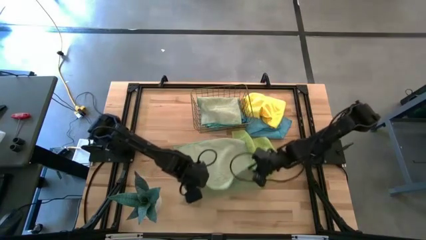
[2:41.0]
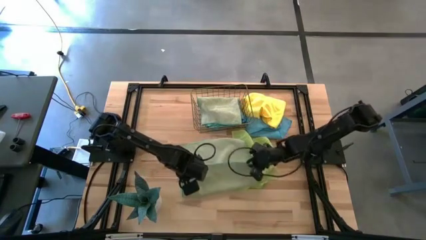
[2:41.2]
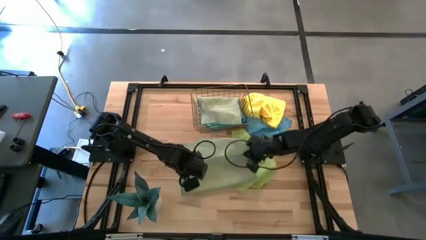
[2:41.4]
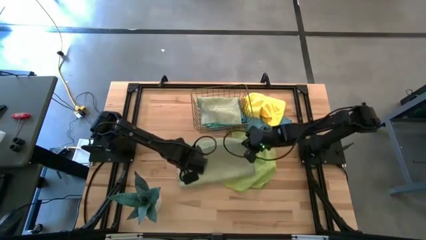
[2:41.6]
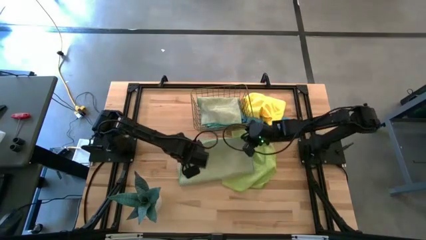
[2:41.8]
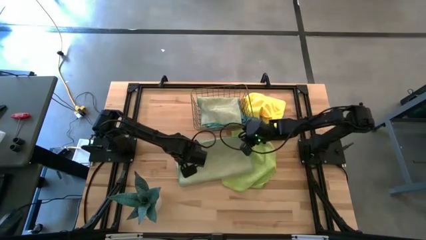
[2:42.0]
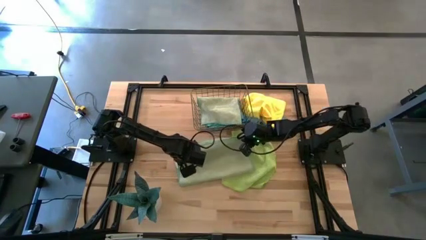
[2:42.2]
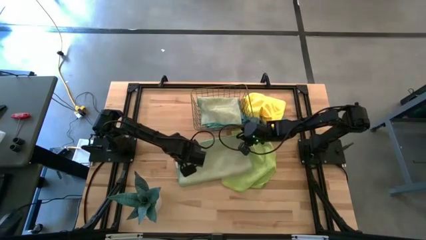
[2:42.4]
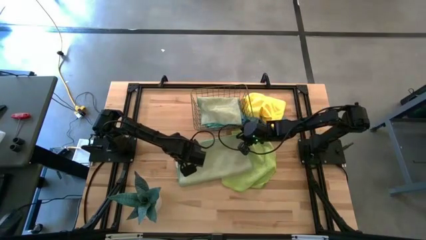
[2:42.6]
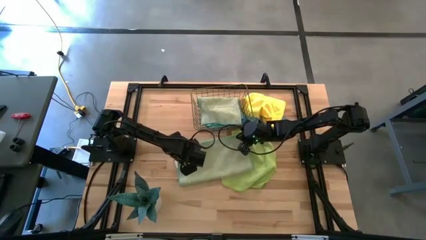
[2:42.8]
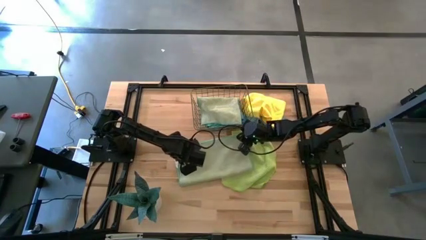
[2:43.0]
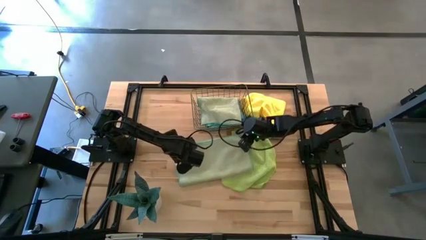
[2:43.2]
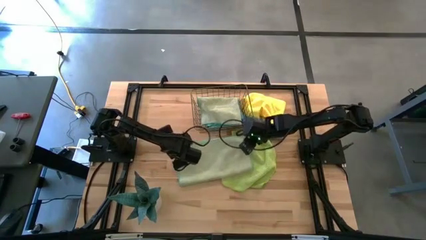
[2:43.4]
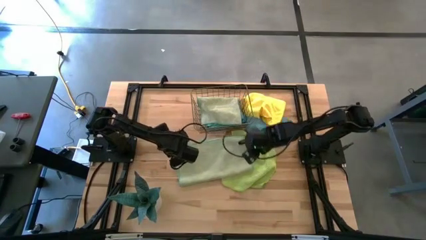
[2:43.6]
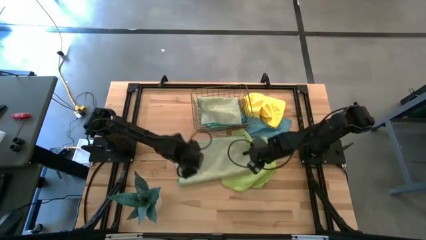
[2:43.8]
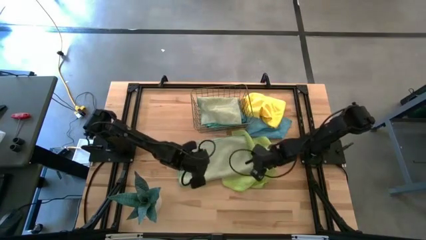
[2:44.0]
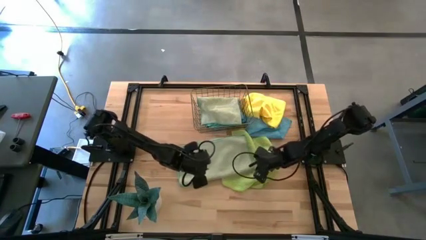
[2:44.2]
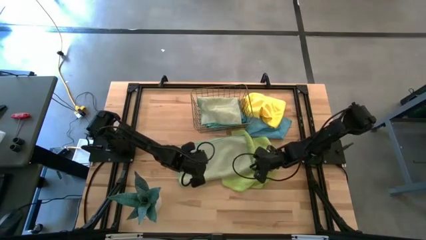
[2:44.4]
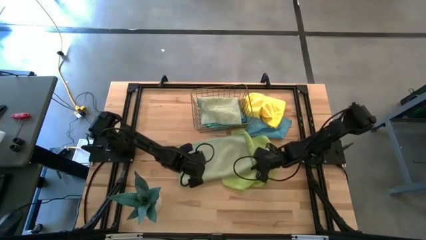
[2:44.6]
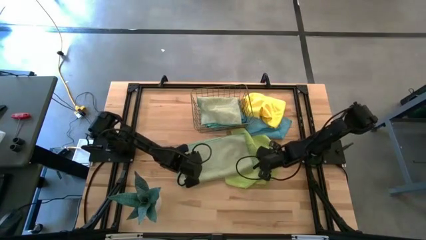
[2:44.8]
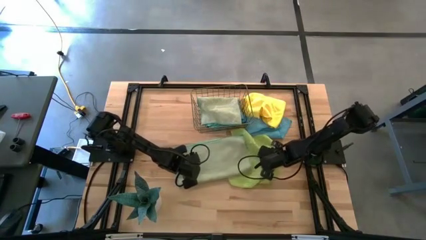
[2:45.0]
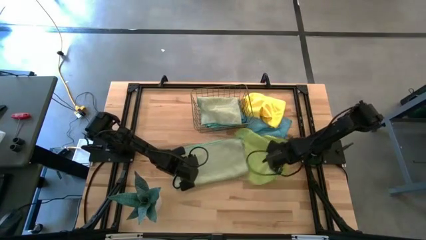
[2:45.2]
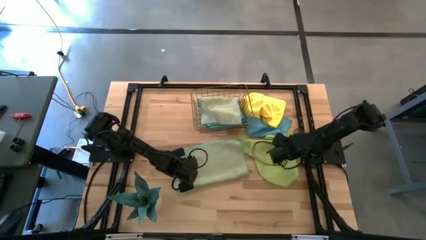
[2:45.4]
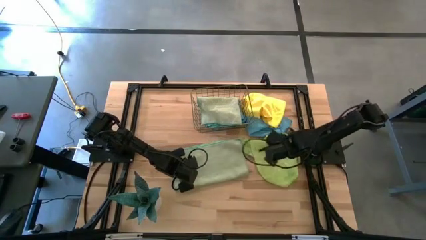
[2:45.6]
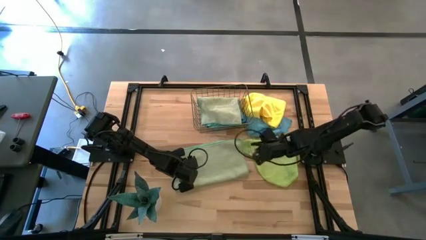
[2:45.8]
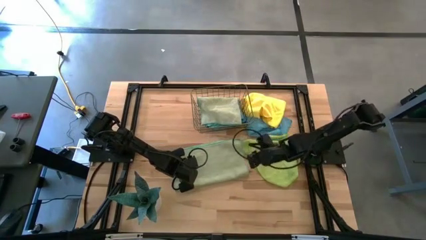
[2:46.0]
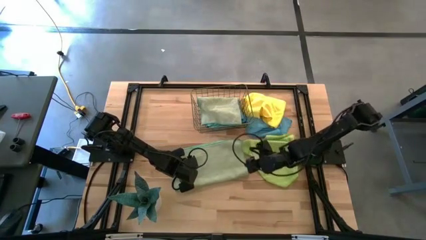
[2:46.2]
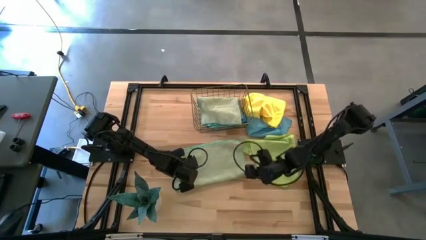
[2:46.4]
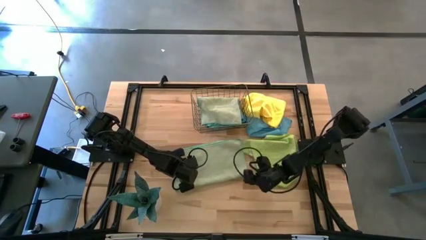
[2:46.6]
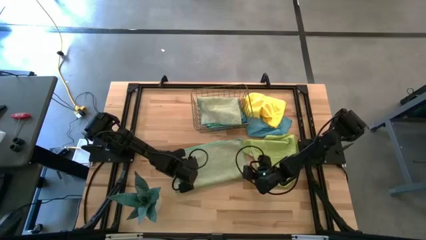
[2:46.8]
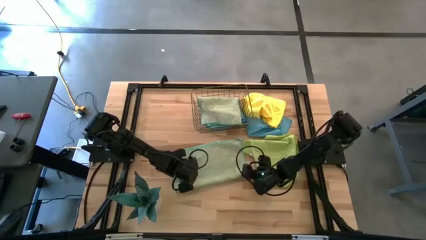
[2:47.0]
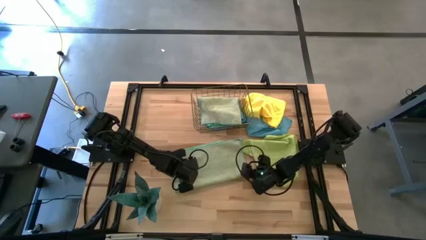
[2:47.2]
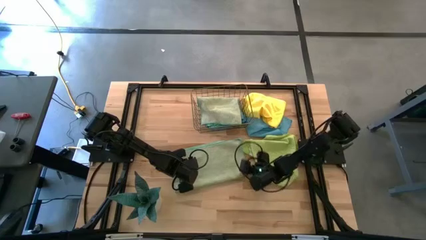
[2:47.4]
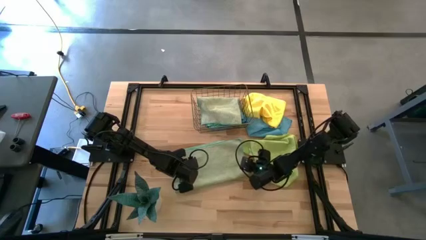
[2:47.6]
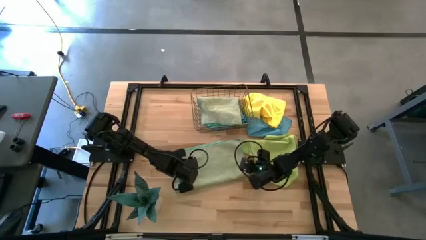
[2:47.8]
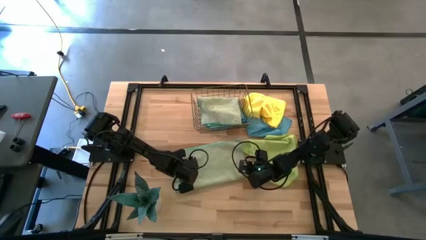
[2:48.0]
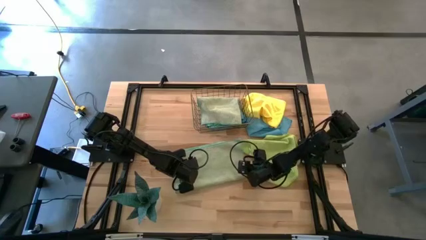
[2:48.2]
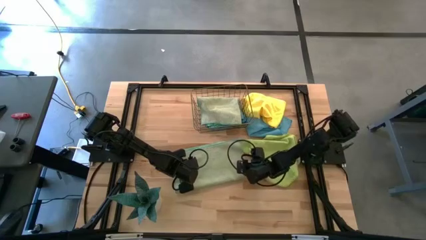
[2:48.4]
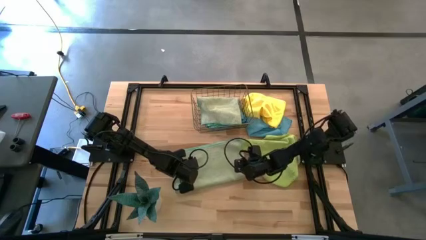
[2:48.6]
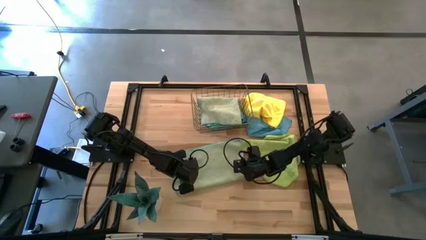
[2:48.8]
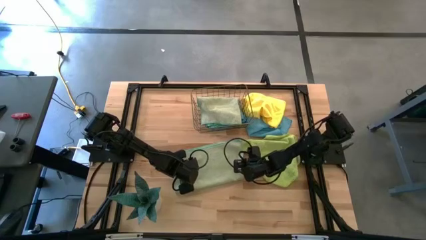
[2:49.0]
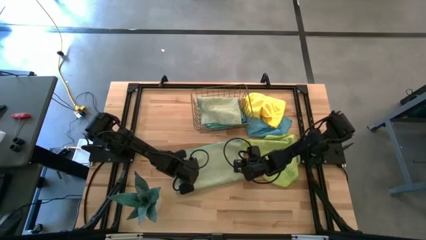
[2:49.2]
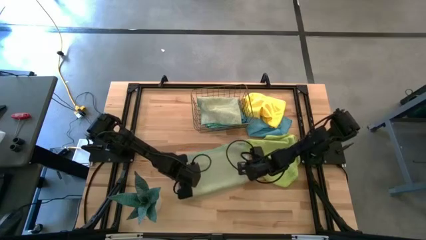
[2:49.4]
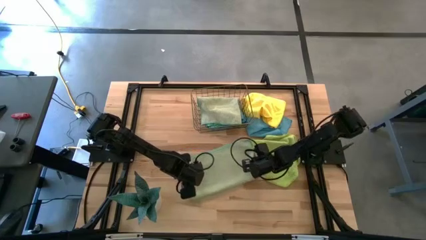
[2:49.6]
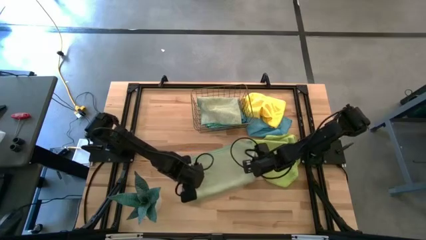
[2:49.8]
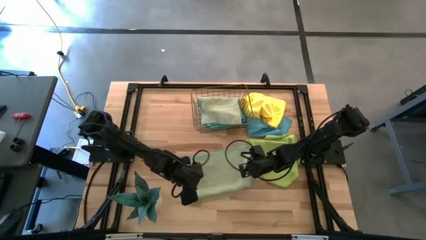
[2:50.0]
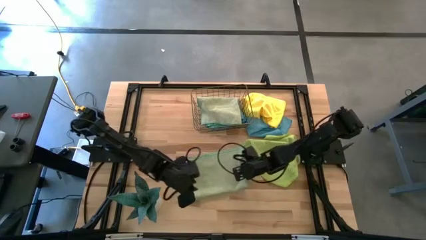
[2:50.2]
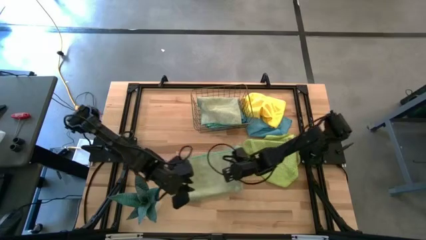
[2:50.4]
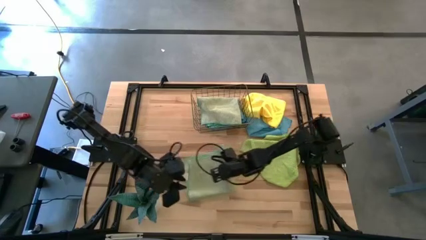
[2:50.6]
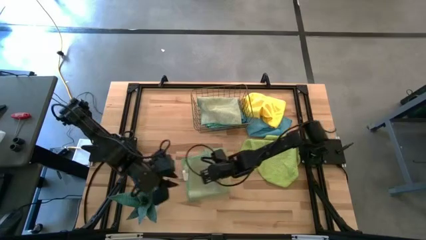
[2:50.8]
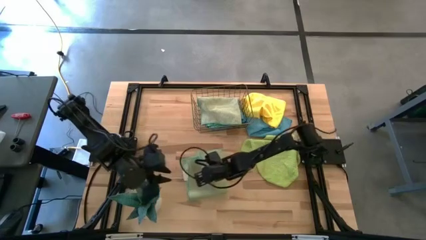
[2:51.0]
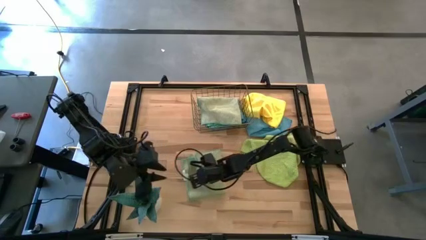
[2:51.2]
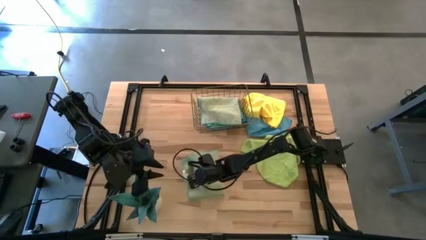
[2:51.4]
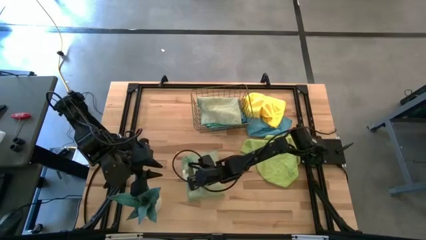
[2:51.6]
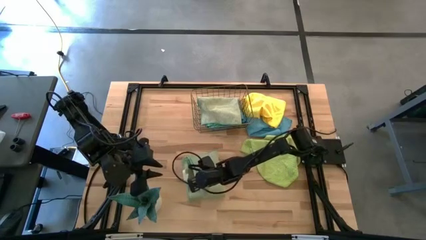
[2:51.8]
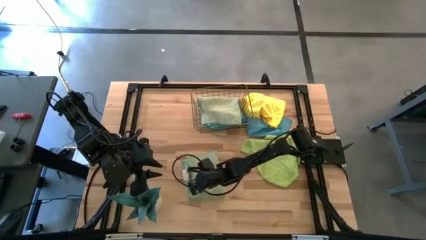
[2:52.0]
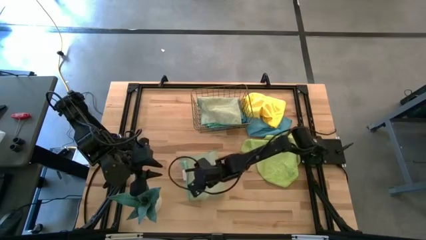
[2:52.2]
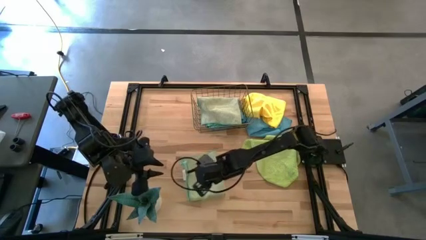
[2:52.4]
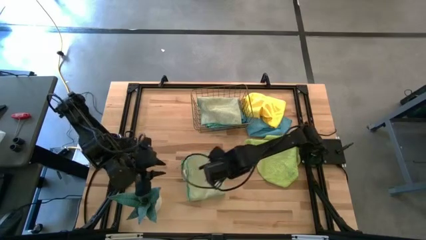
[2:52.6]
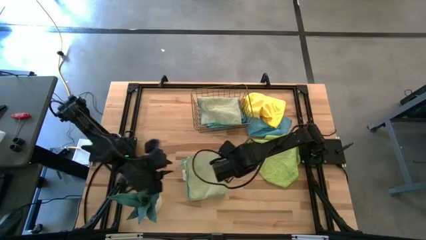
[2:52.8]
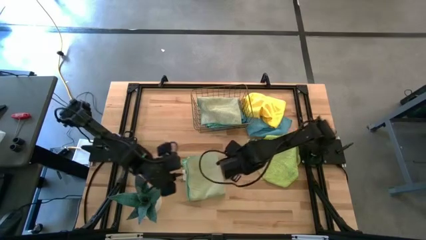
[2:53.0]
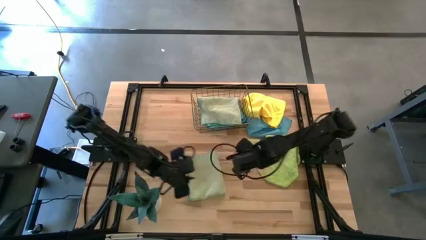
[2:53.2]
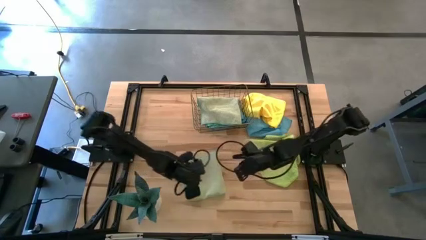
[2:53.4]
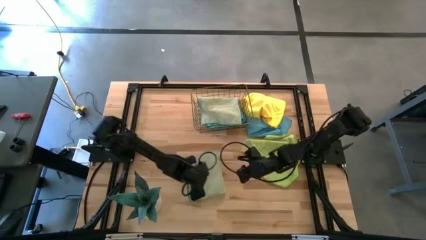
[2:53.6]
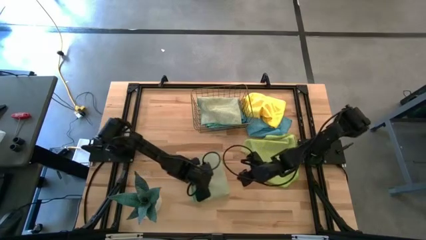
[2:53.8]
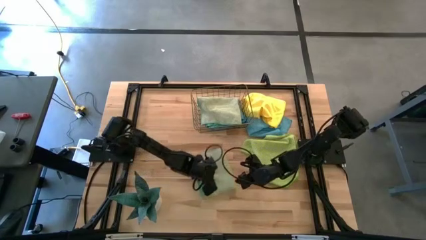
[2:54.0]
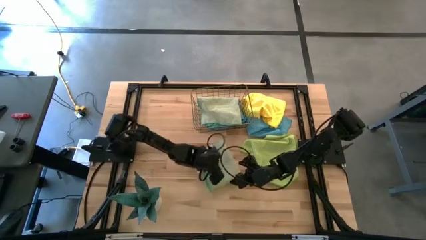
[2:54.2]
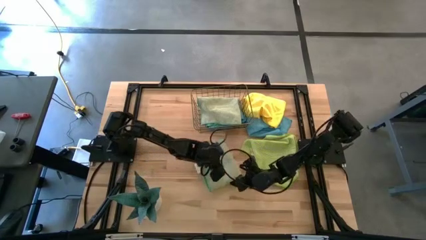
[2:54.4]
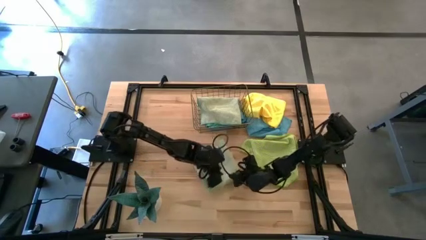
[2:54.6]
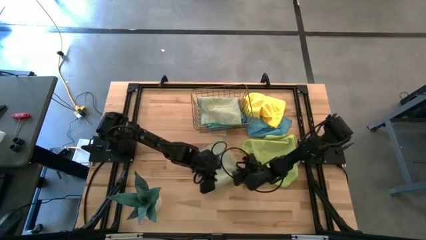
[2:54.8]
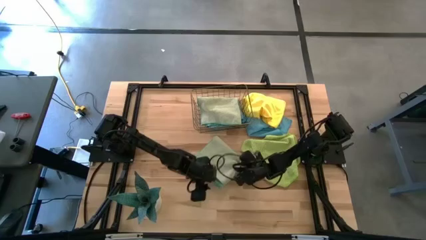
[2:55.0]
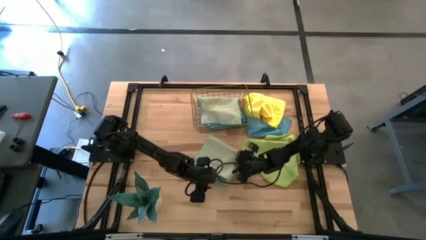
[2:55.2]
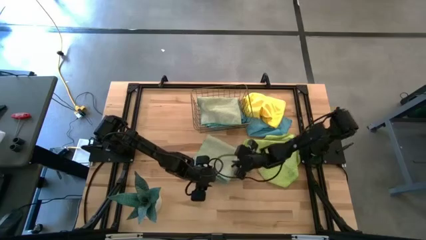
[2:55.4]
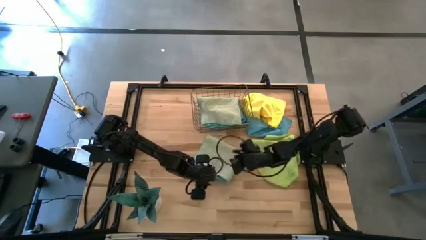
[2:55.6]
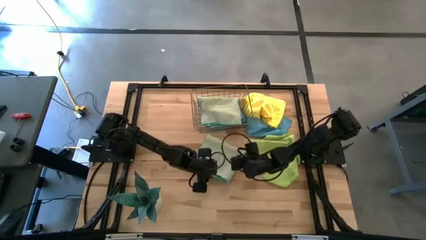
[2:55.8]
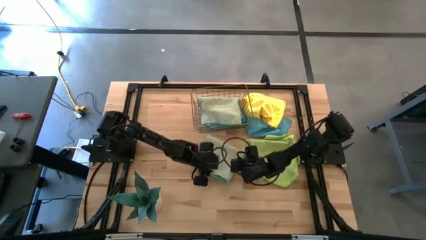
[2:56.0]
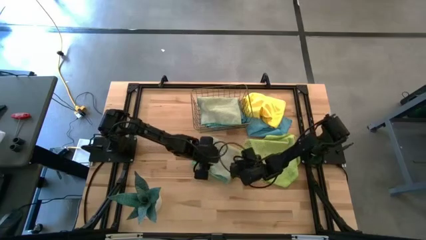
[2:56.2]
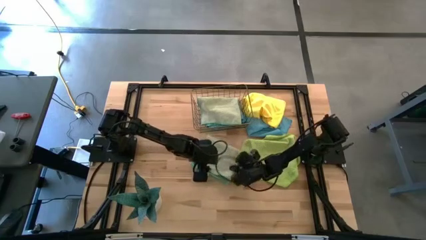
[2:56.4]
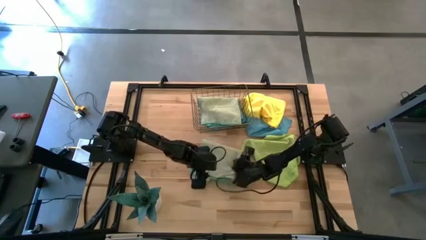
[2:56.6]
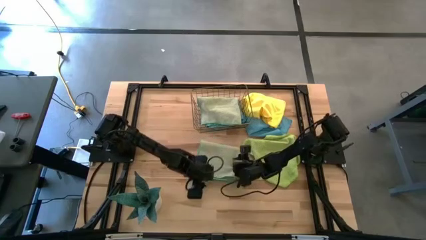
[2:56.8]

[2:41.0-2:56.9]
Task: Fold microfiber towels
Fold the light green towel
